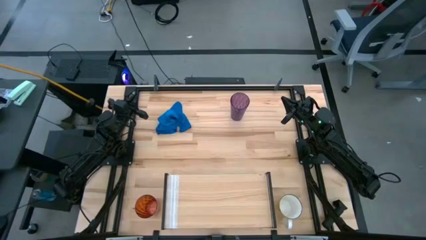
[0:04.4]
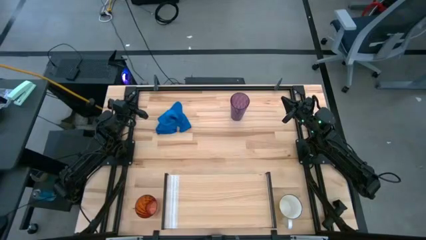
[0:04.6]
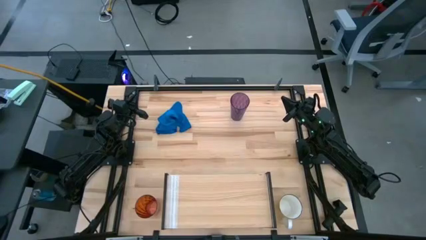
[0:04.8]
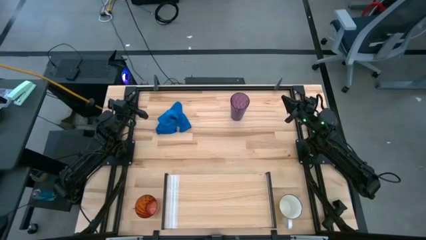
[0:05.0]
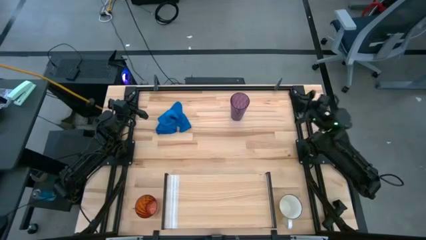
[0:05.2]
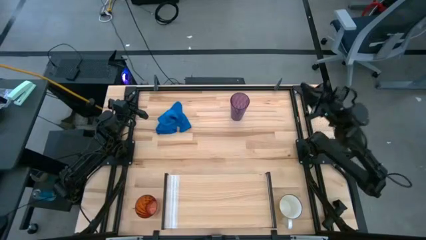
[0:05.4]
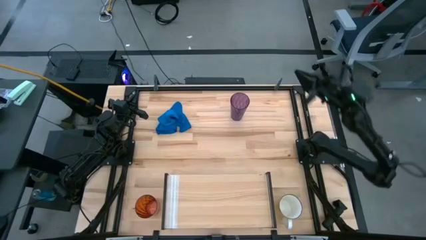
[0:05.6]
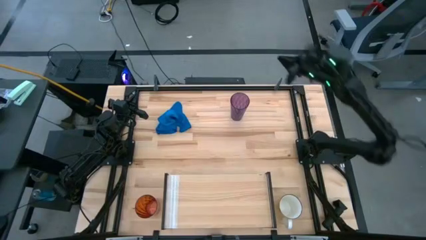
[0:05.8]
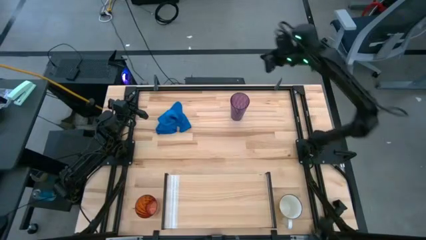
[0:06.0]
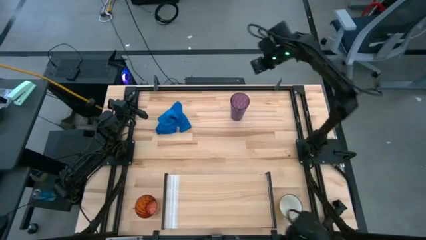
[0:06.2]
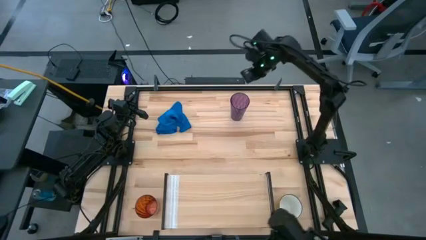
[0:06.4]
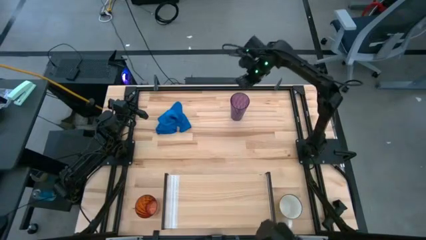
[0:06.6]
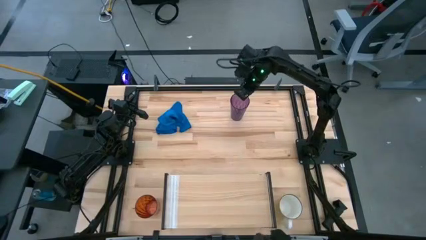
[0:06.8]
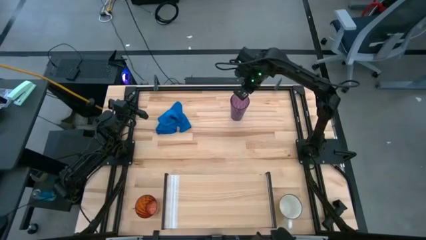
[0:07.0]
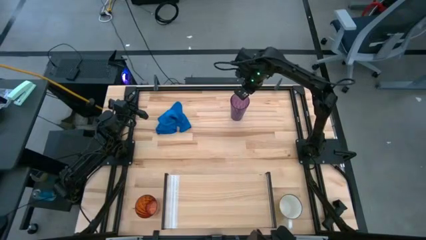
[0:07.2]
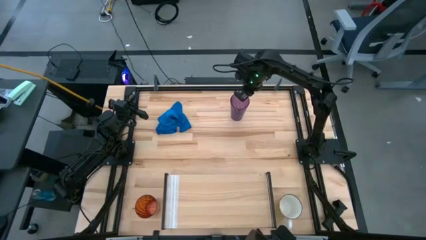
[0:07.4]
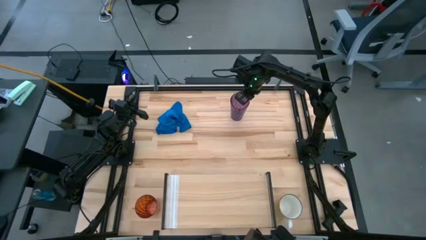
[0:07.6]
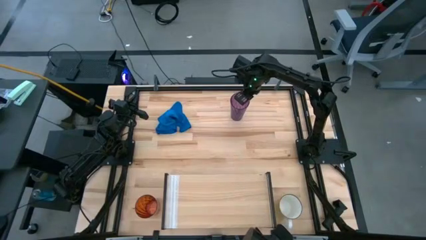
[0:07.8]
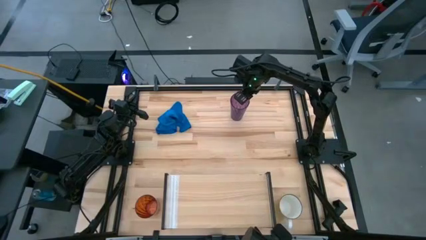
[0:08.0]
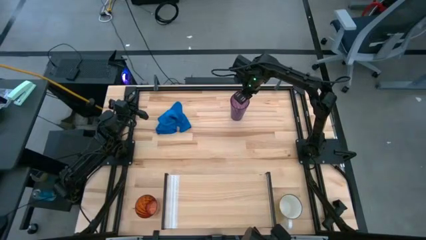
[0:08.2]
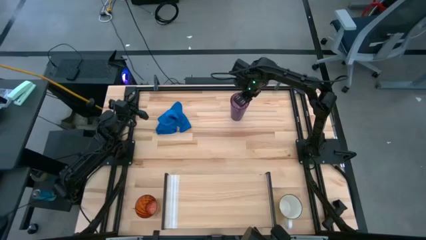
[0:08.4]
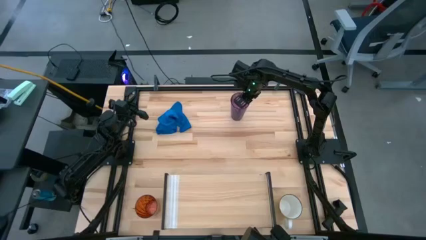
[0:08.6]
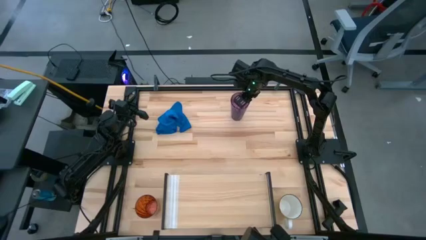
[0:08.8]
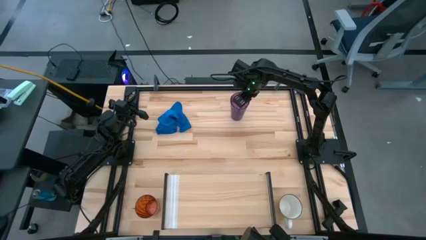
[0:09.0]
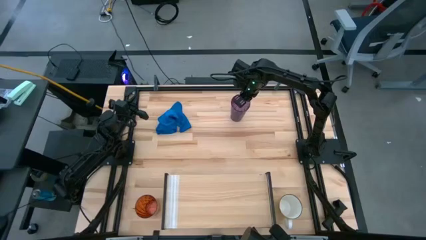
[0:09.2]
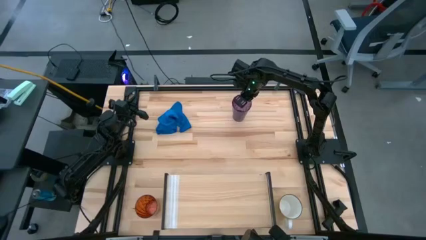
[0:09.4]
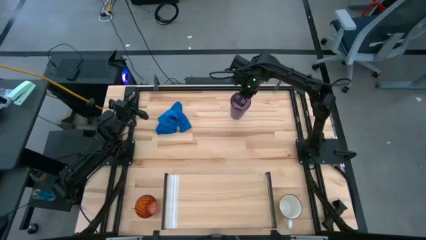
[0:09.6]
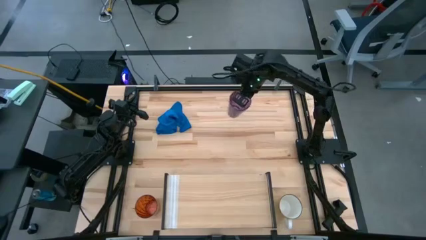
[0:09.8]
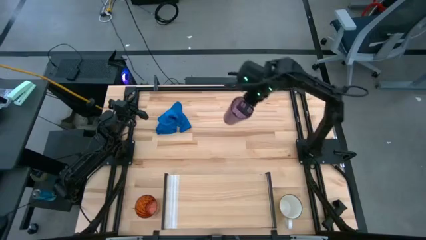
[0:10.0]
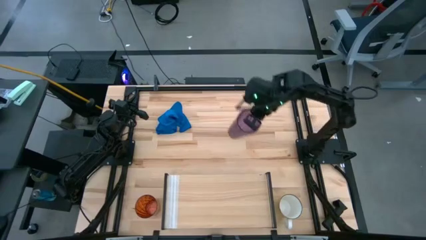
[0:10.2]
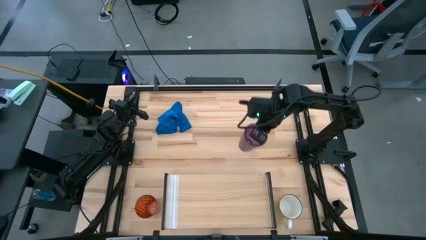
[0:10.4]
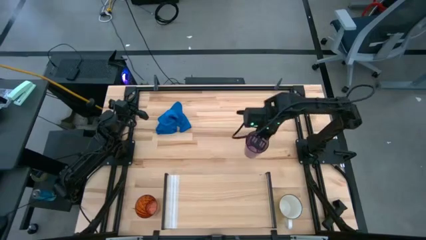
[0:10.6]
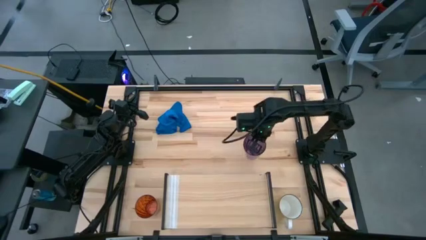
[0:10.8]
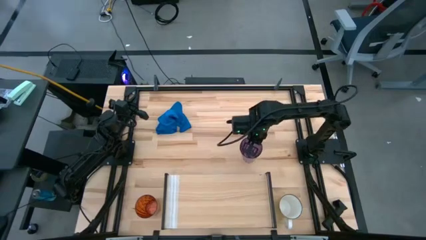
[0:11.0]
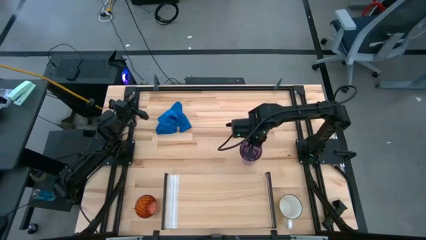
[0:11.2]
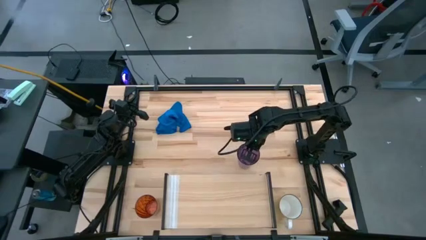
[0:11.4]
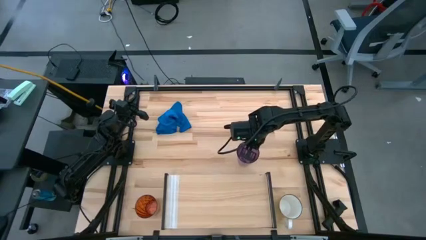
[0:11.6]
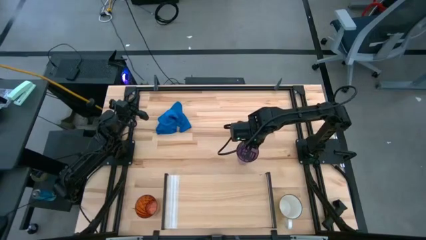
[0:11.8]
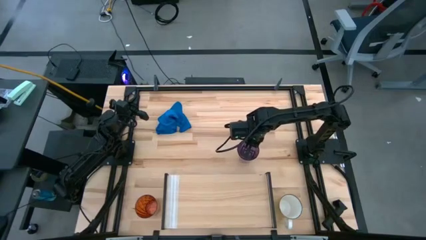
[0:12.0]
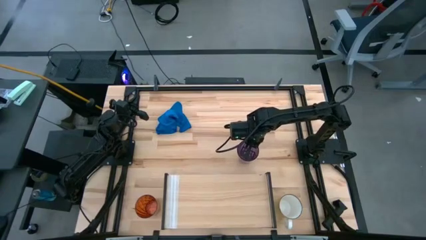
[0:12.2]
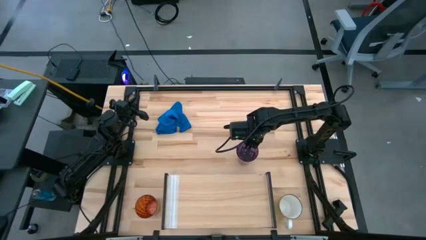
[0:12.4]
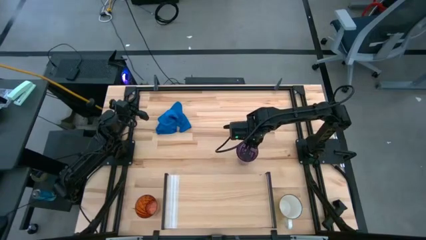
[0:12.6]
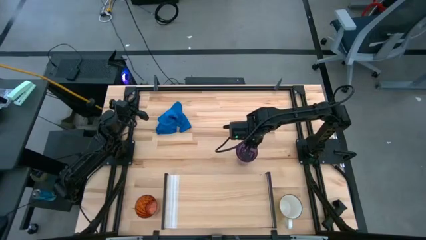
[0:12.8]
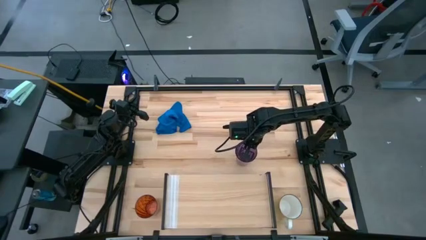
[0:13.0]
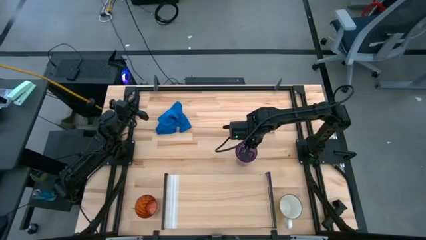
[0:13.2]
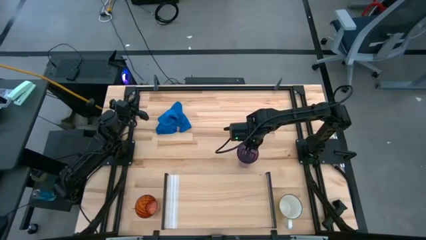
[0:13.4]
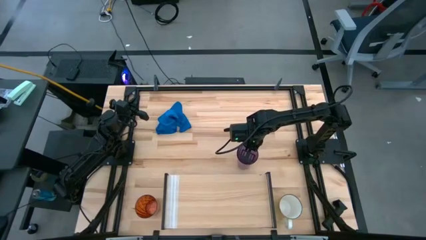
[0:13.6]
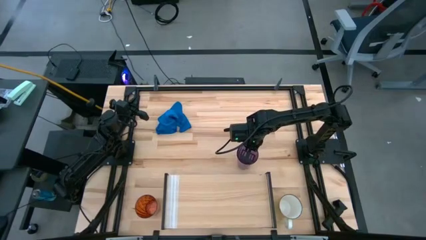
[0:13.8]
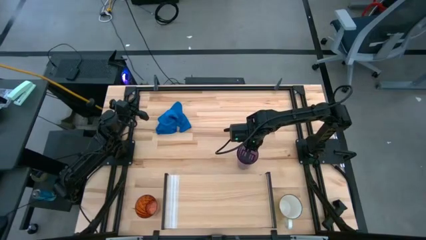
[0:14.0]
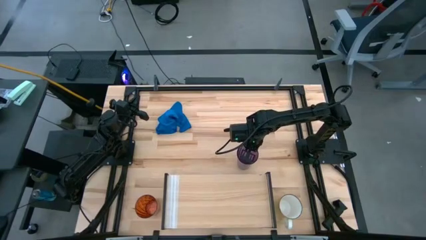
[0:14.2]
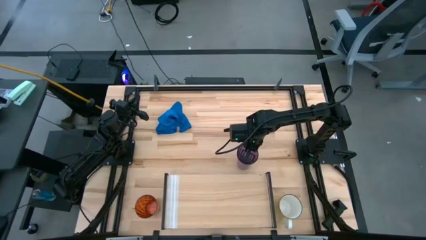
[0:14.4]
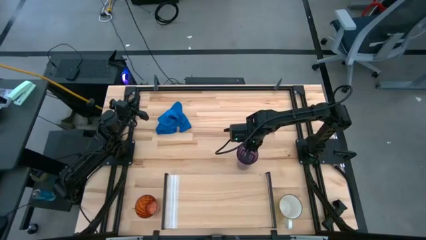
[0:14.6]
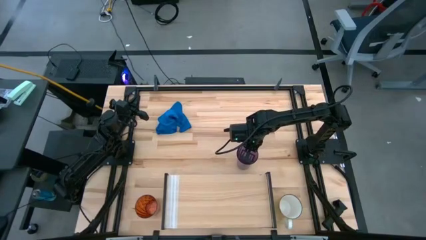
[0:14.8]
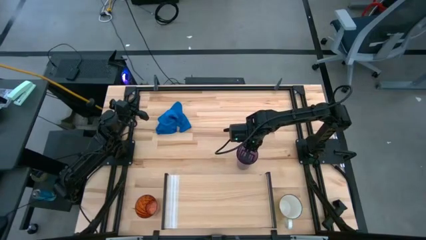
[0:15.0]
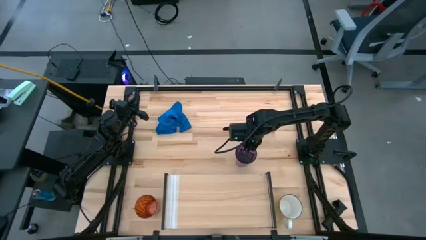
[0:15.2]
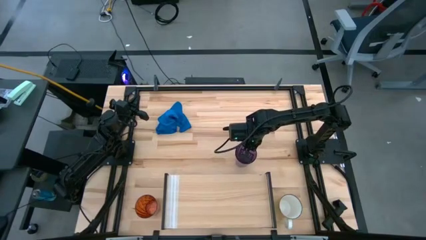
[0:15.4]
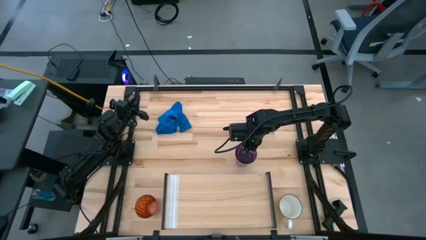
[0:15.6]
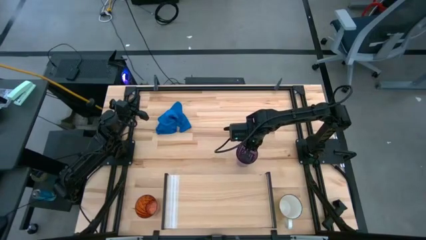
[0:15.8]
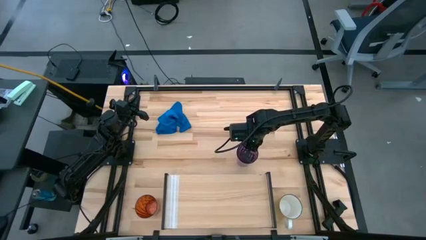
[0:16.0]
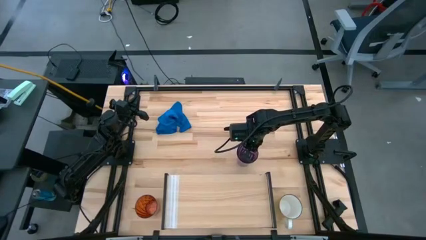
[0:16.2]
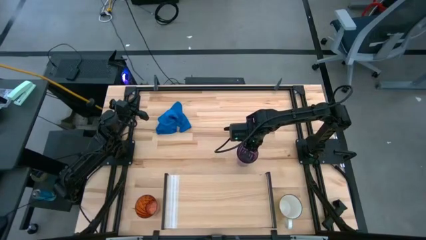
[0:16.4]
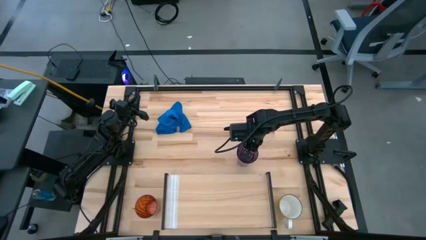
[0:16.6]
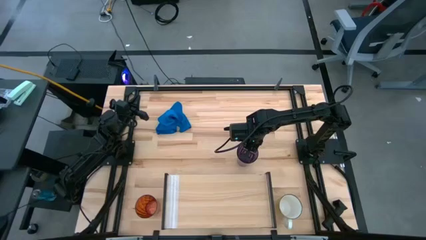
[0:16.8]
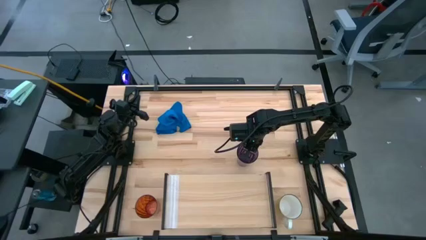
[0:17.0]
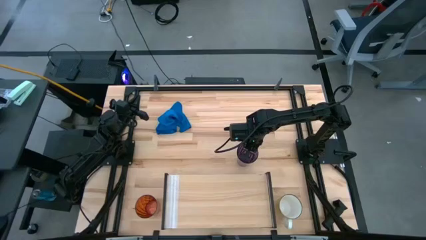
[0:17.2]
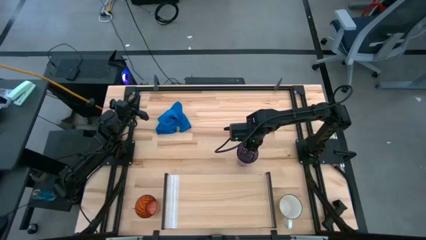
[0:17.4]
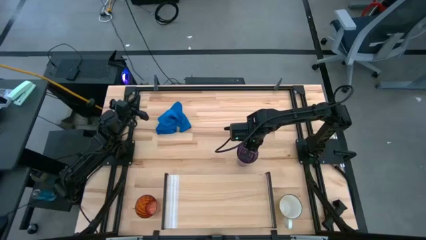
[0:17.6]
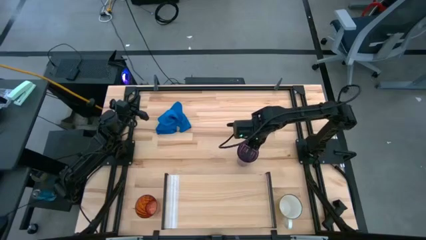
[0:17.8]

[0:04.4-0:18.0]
Task: Stack small to large cups/mugs on shelf
Move the purple cup from the top to the middle of the table
